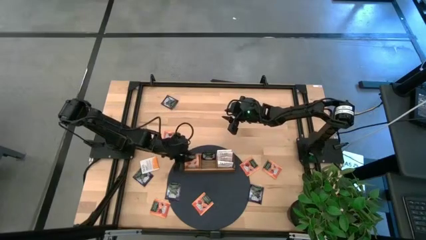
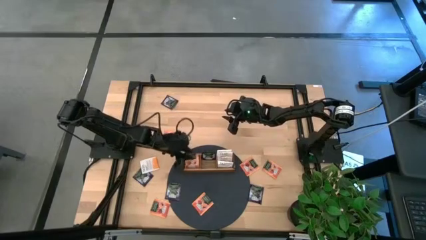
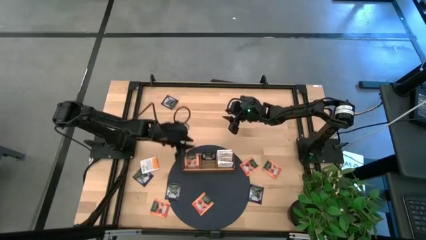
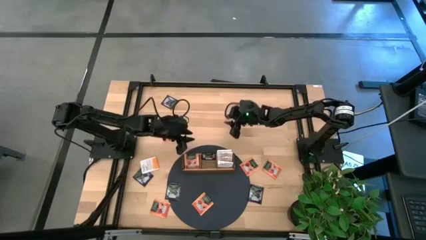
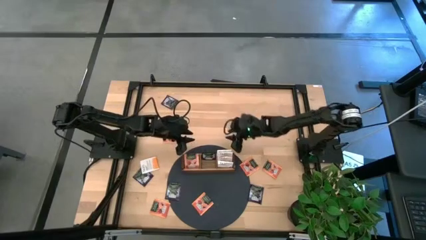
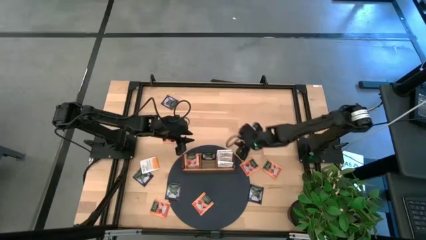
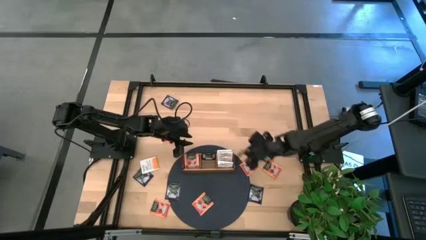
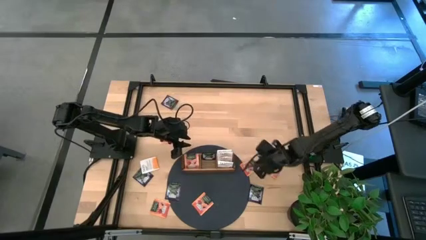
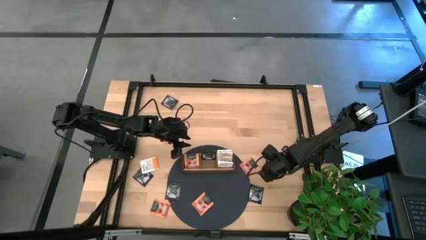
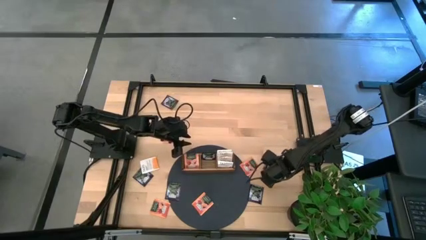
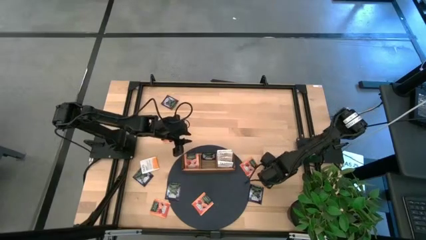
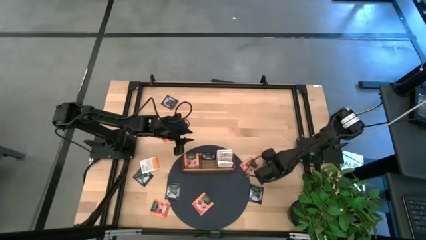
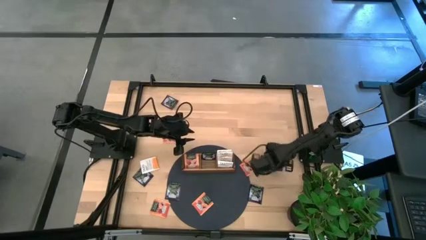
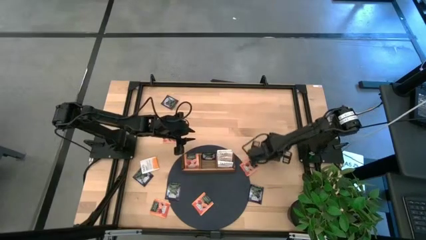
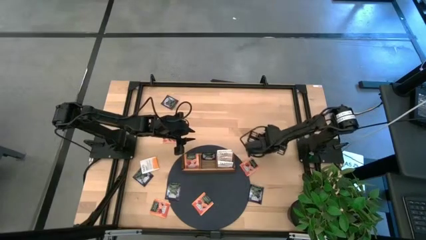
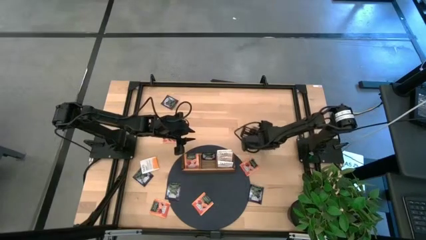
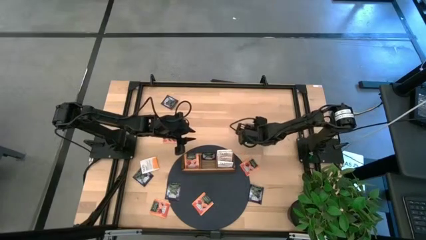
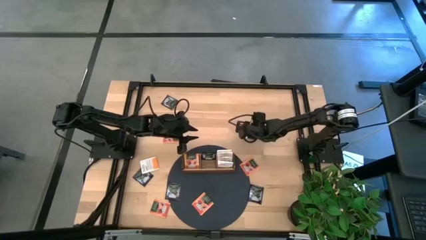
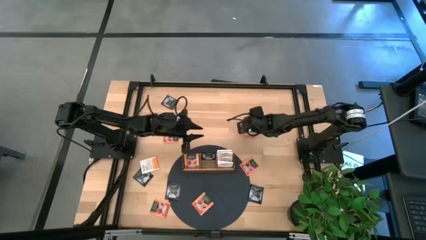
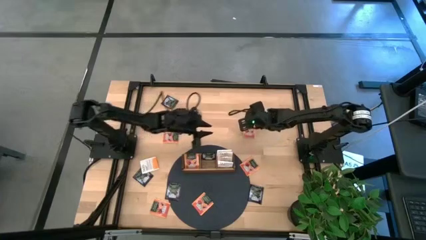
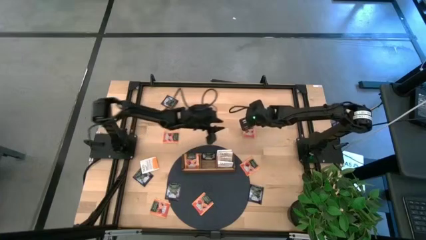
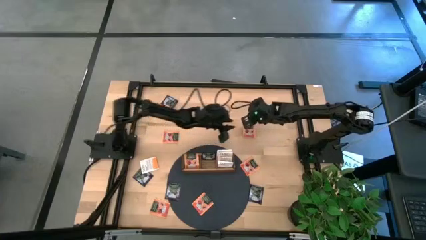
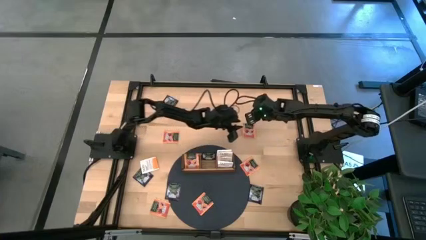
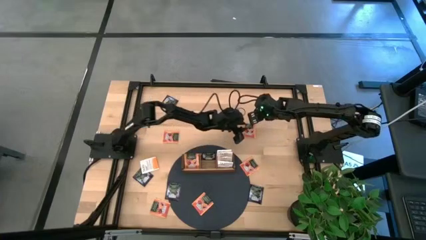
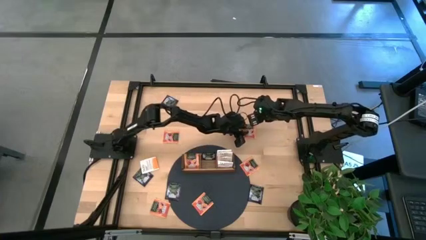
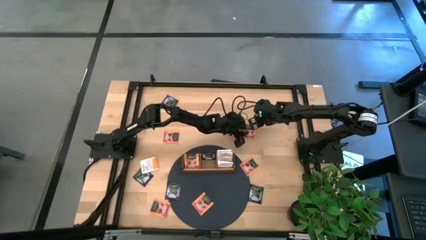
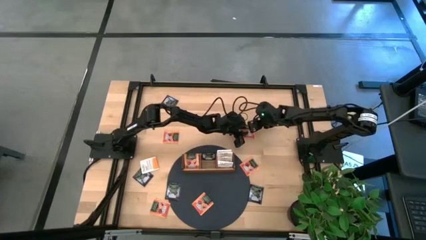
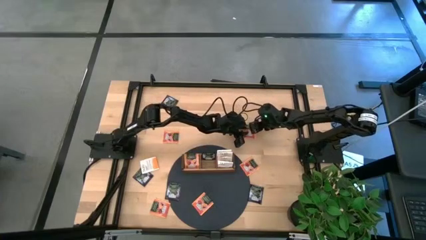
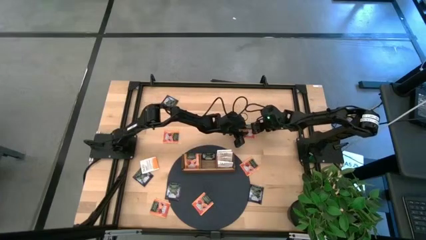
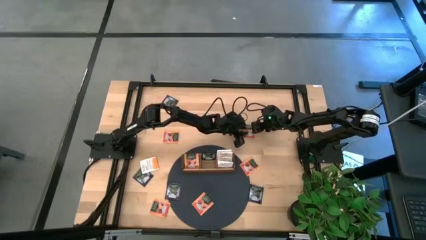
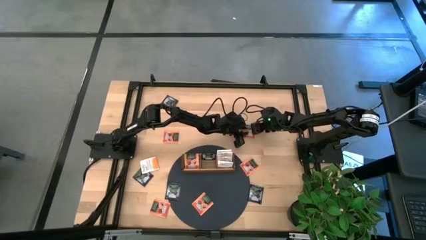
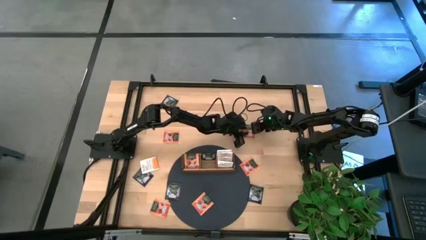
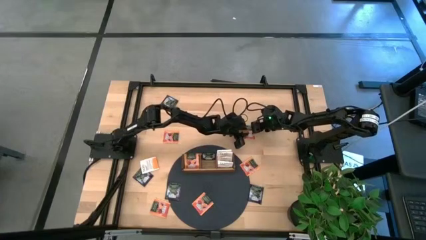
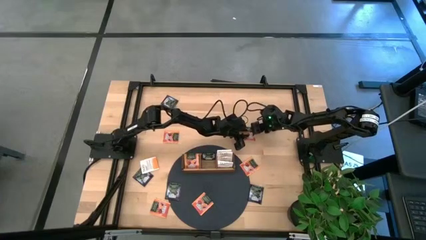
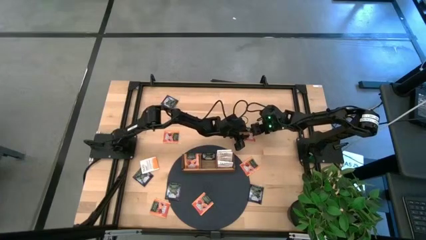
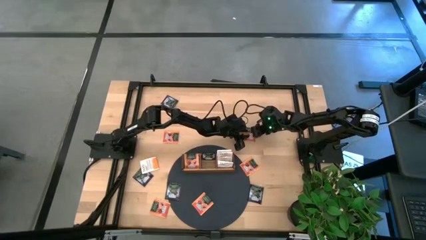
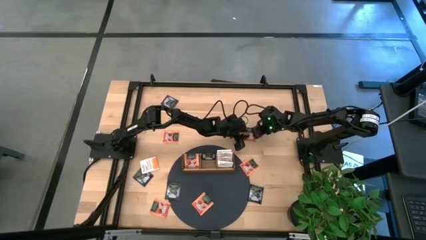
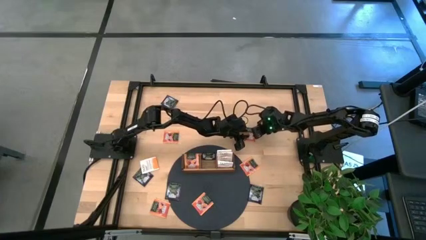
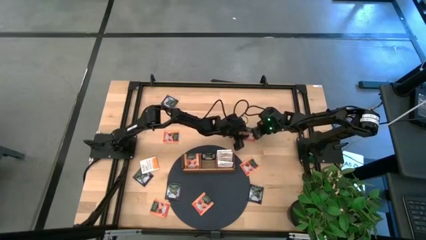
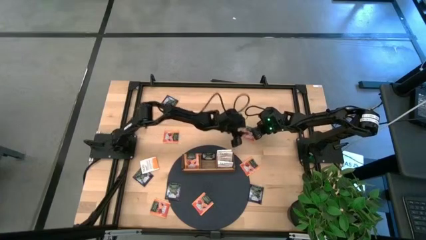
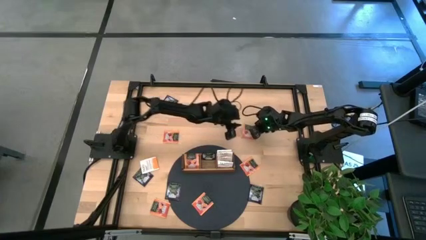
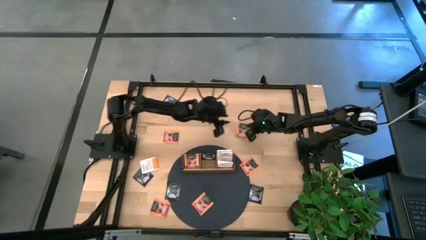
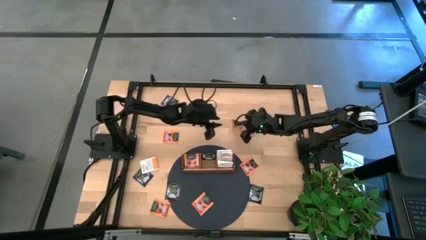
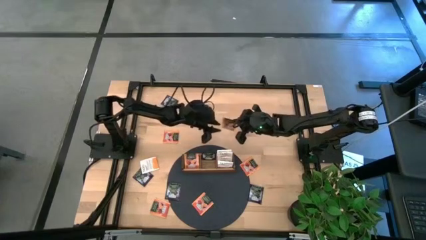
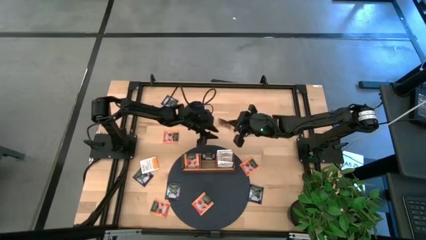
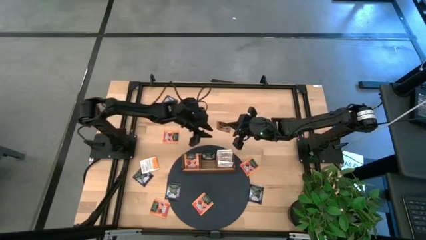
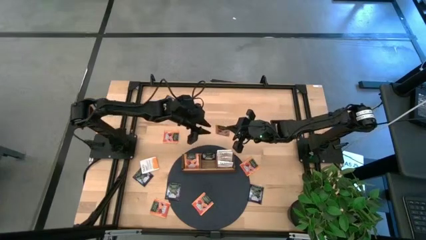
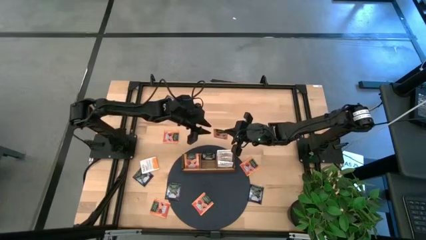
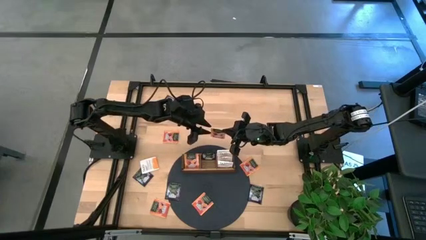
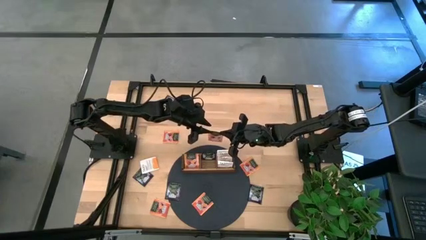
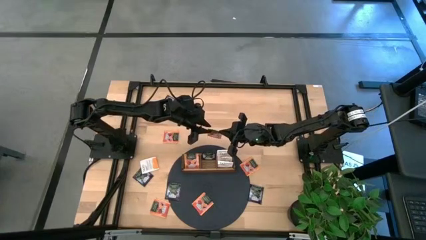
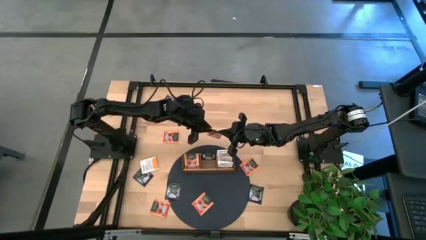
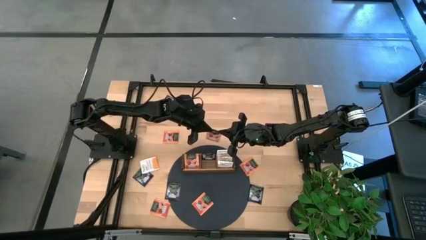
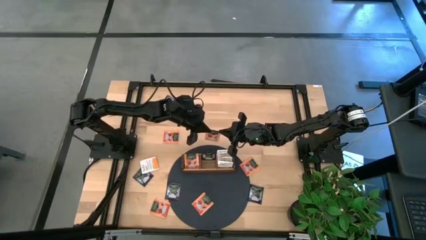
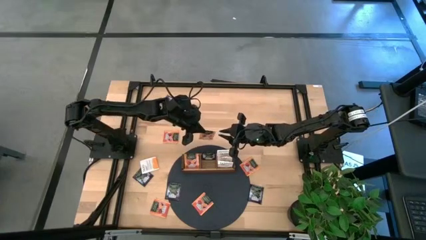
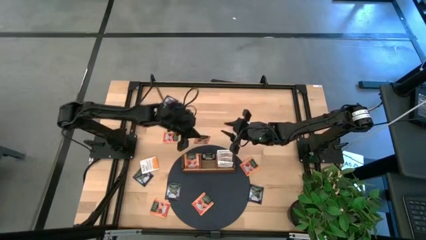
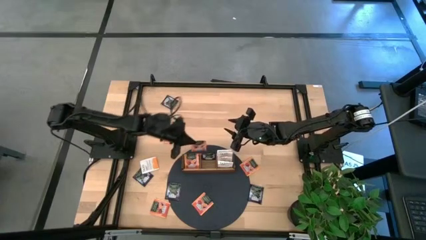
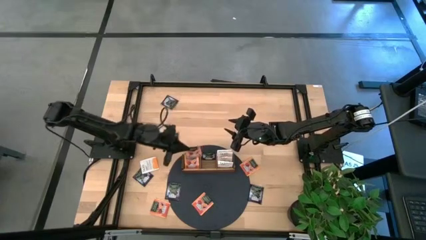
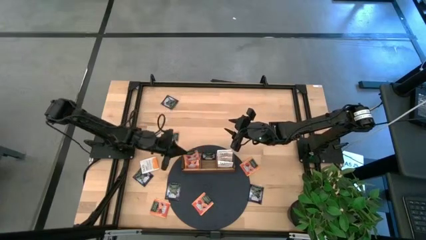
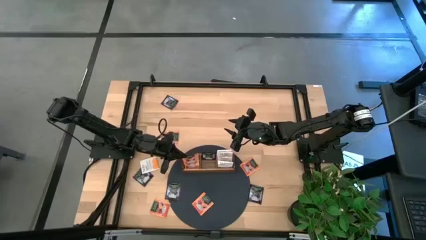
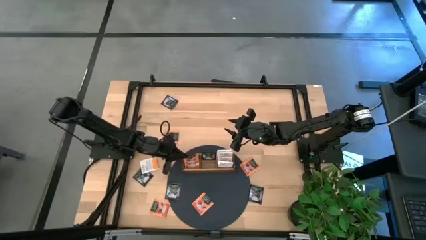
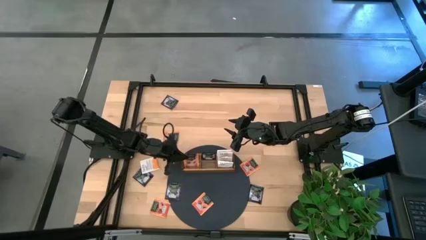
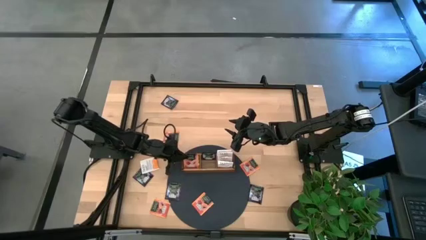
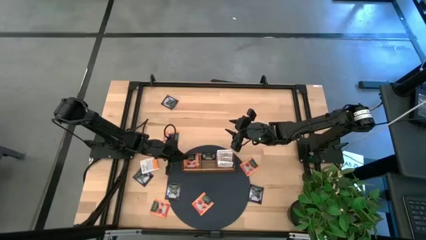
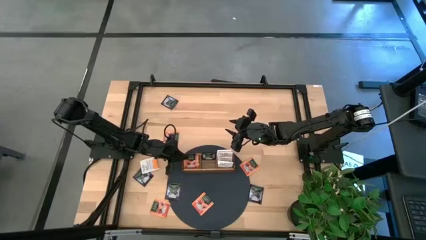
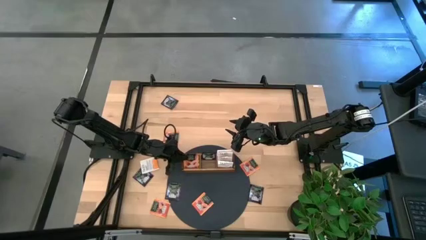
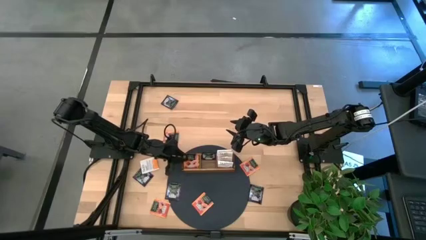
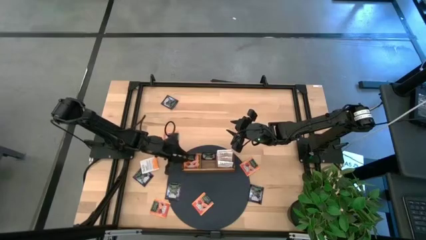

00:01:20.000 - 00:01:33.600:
Task: Pick & Place Tea
Put the orange tea bag into the left section of the wooden organizer

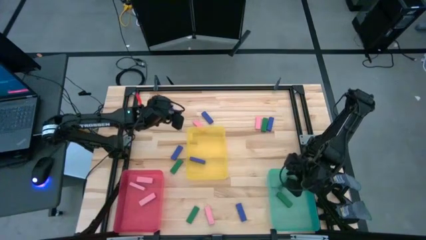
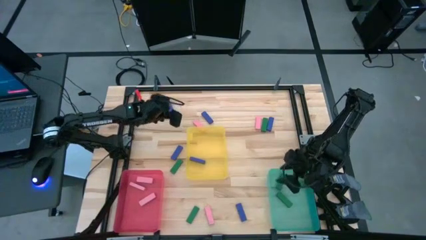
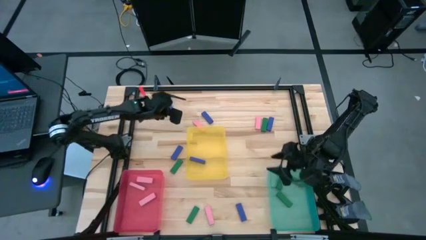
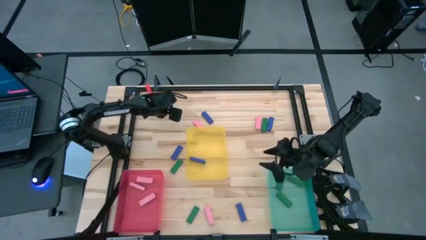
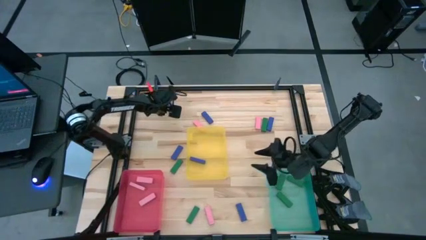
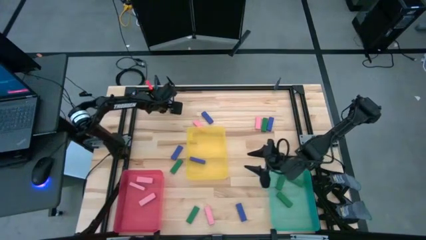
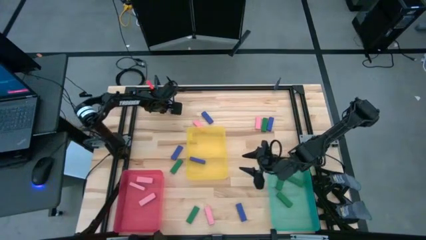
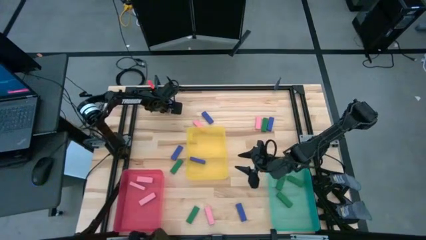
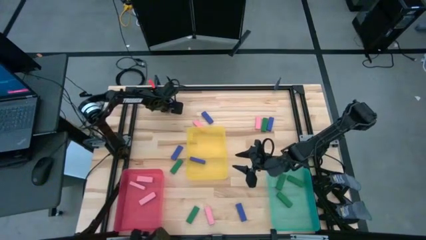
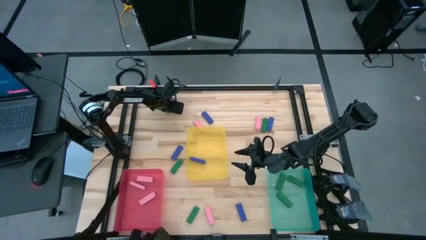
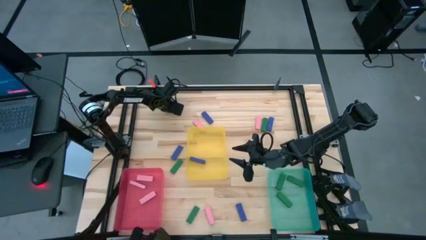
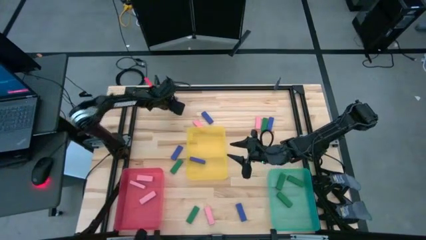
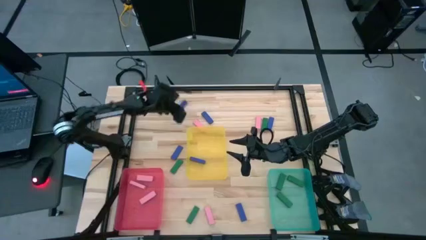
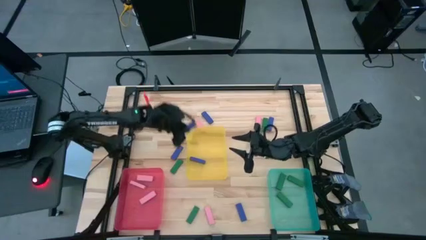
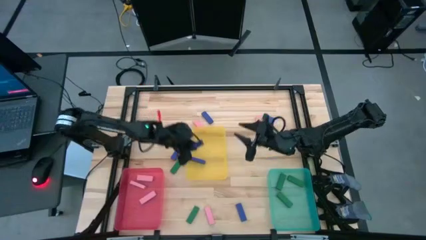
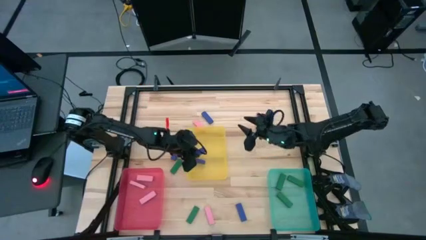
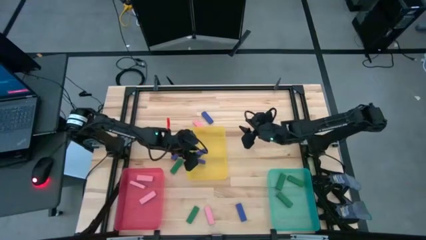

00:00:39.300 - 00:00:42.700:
Task: Sort blocks
Put the blue block into the yellow bin
